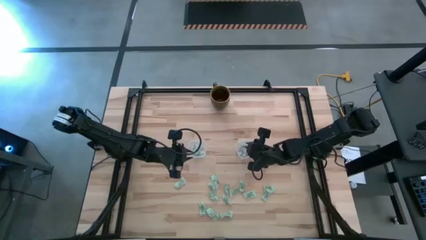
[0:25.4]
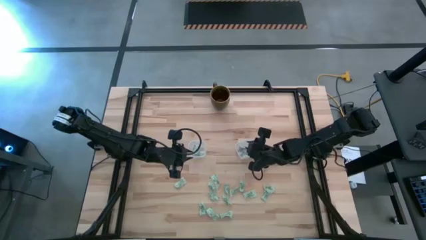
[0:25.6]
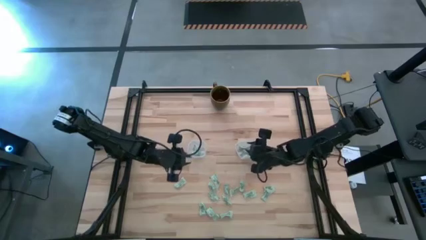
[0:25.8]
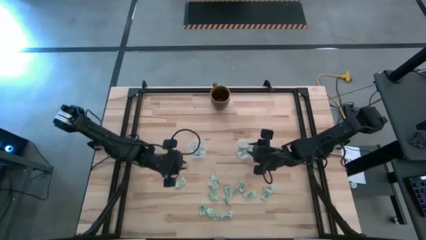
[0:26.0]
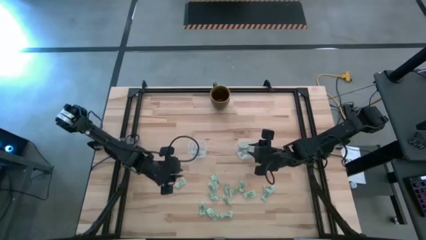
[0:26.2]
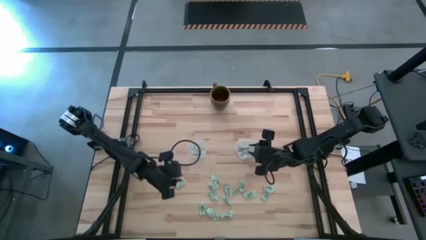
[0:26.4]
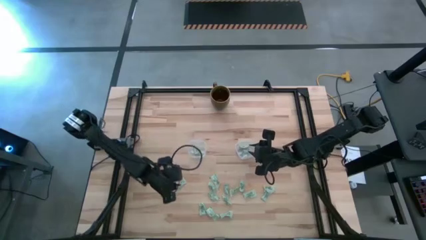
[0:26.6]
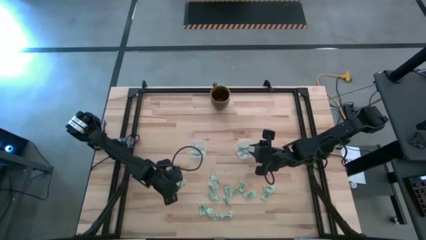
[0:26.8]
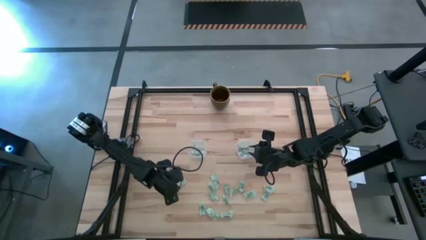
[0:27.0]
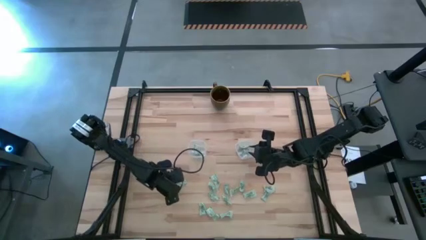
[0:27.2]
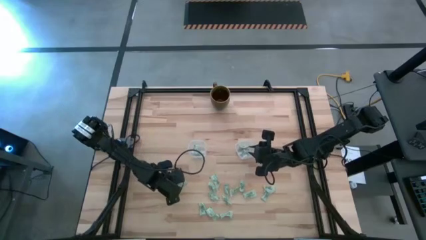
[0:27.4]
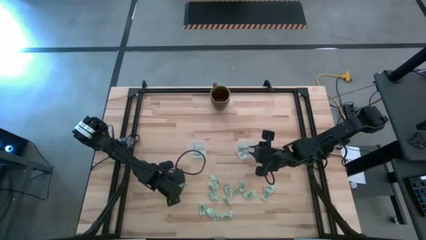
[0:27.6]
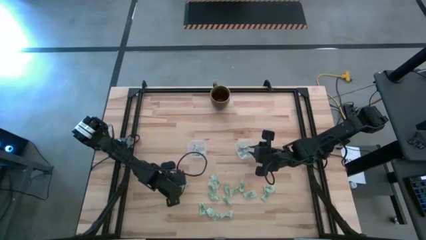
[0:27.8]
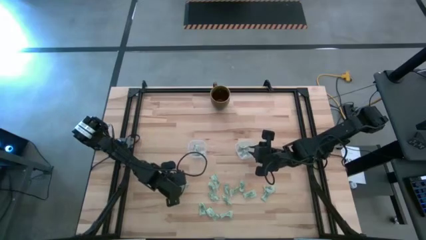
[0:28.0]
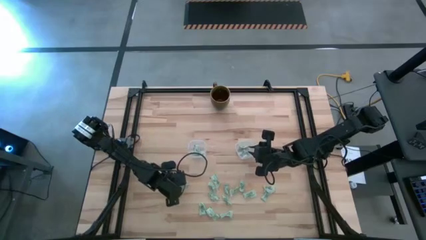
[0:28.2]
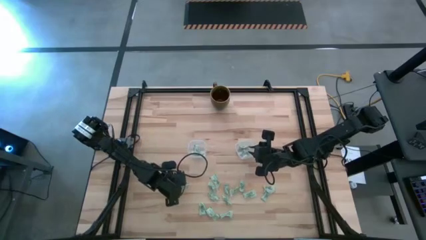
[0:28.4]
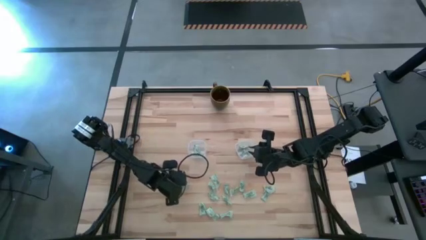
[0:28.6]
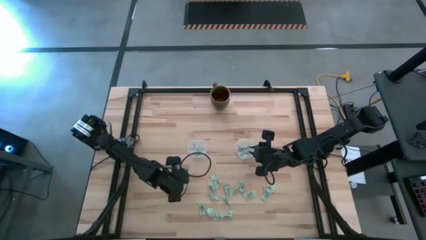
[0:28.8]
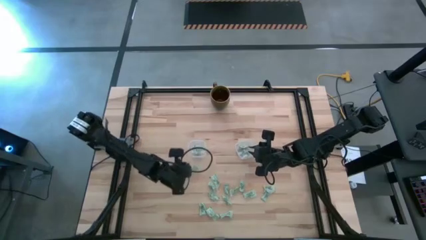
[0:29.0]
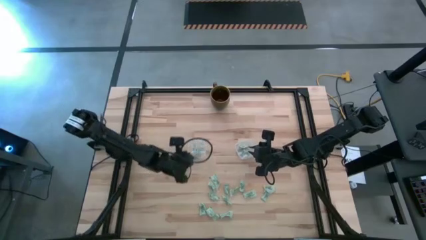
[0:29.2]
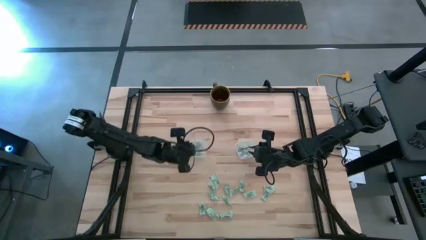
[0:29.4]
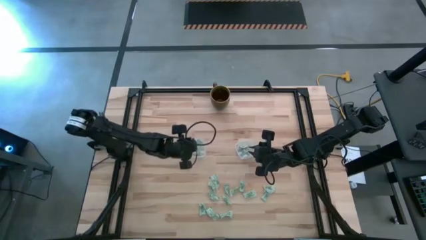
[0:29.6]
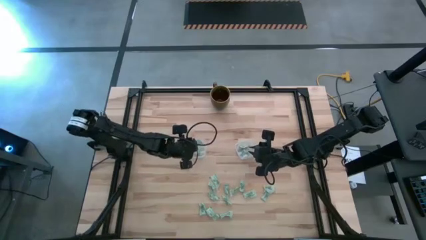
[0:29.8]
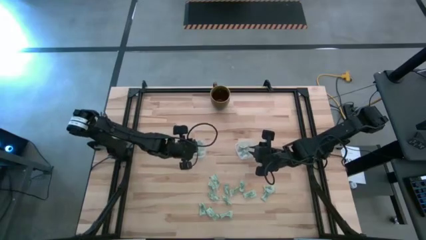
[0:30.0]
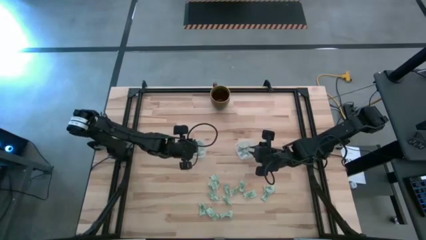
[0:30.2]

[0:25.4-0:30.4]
Task: Pick and place Stevia / Truvia into bins
Put the white stevia packet into the left transparent container

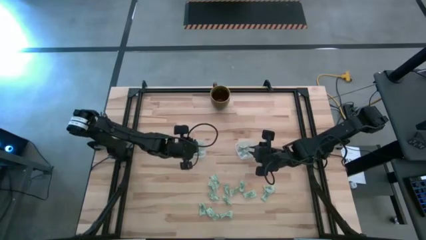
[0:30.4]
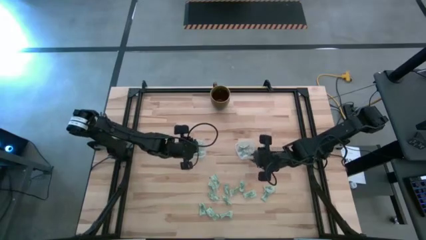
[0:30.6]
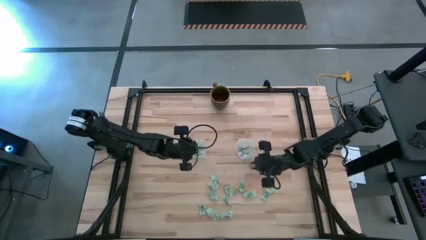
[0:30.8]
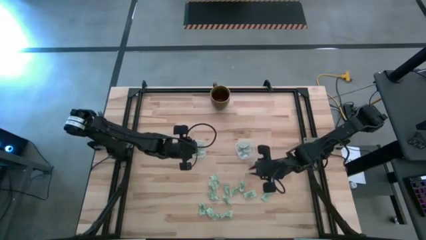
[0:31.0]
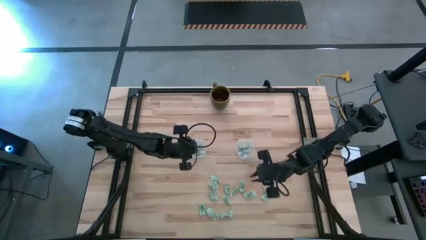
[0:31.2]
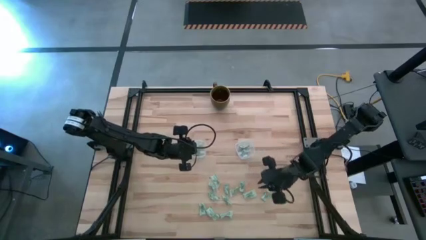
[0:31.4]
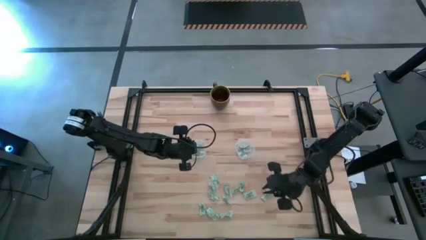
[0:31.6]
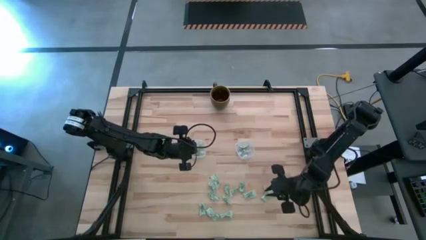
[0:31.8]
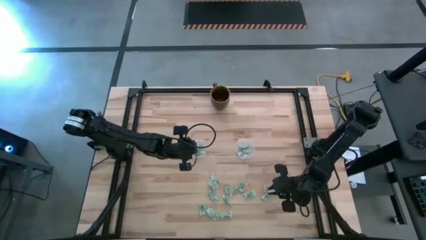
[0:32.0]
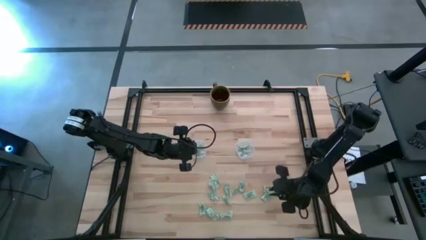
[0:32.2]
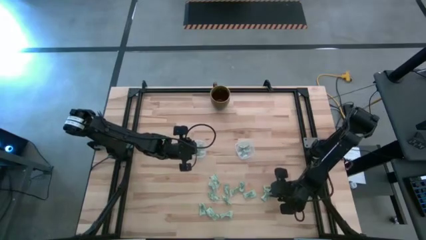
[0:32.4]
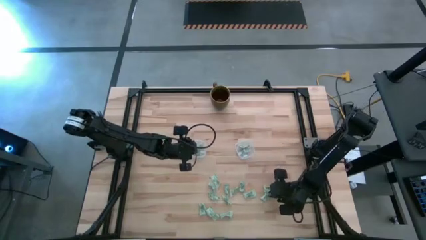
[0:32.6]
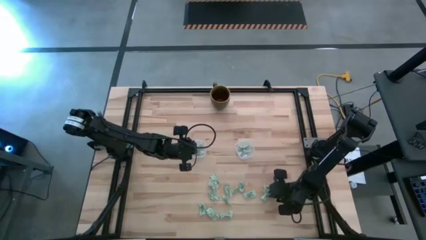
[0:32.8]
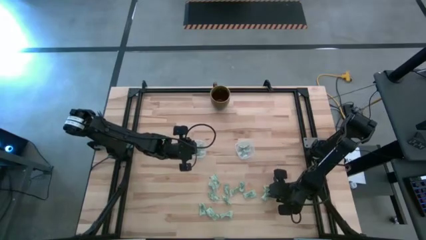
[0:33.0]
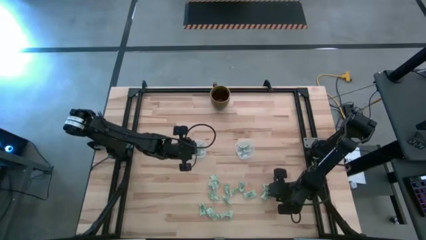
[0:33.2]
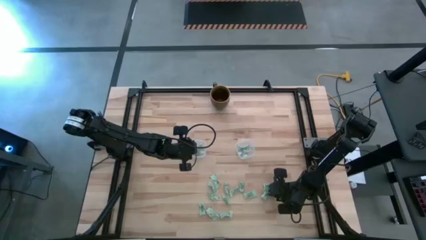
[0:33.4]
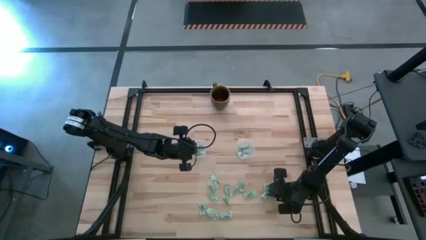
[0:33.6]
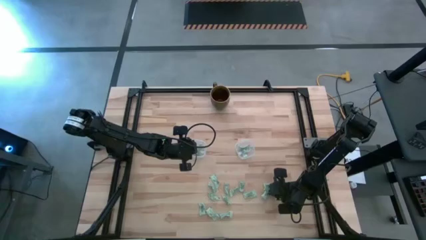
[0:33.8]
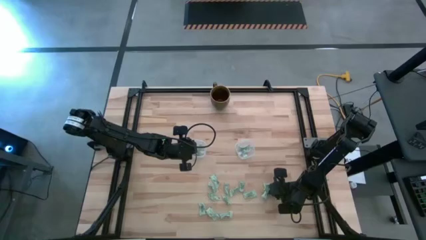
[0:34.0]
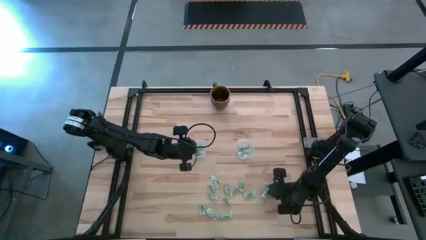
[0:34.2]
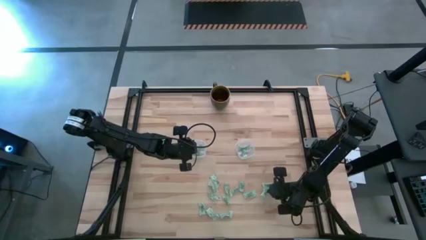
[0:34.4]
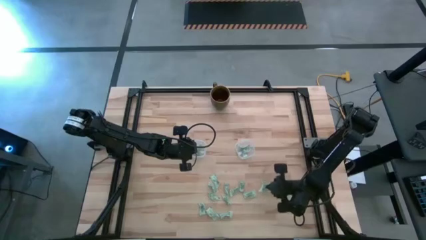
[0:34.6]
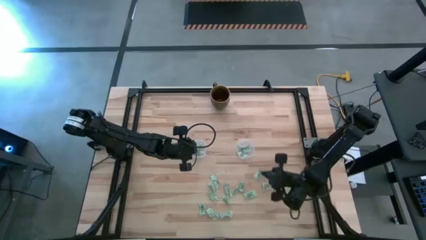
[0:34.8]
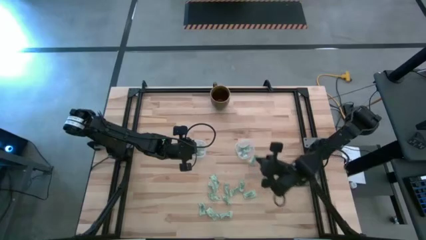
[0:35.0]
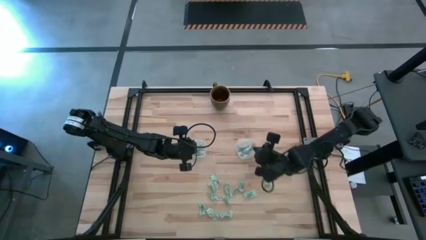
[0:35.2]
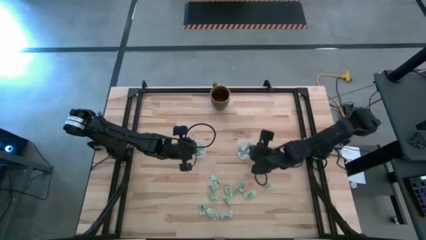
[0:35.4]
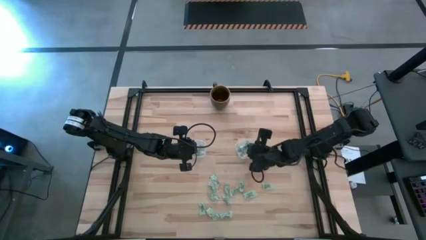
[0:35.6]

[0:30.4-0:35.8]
Put the white stevia packet into the right transparent container

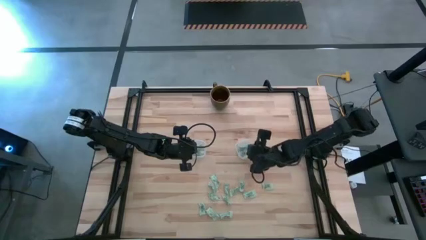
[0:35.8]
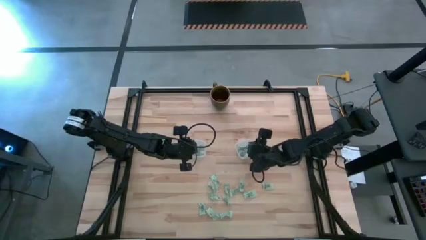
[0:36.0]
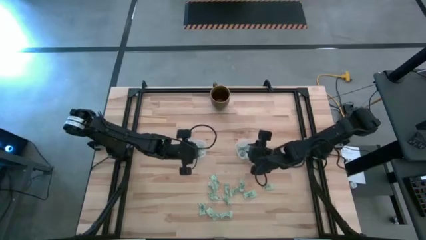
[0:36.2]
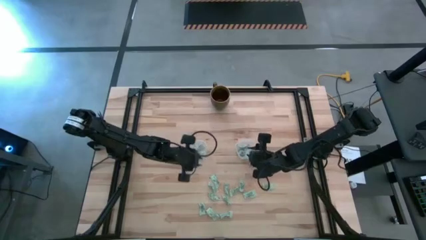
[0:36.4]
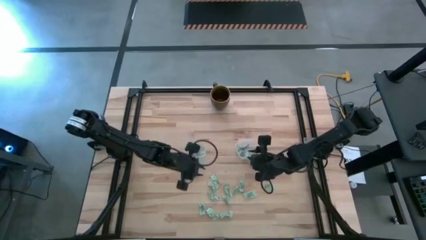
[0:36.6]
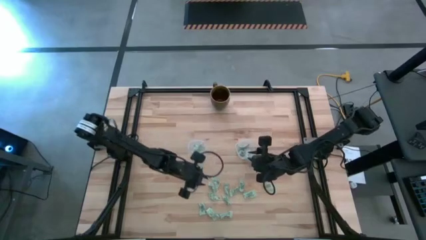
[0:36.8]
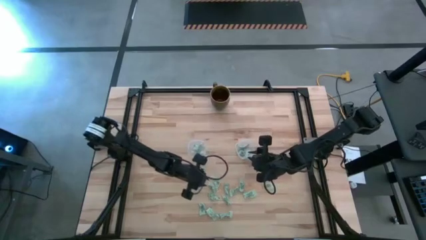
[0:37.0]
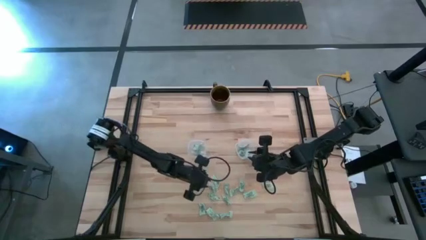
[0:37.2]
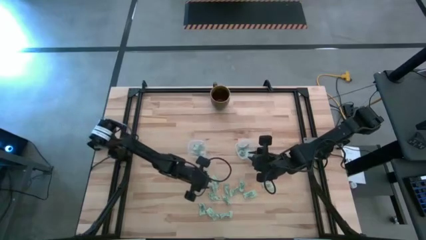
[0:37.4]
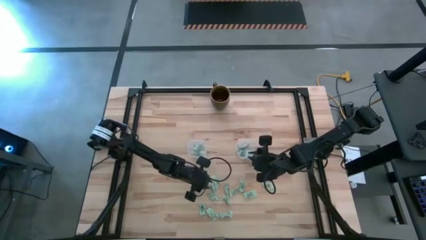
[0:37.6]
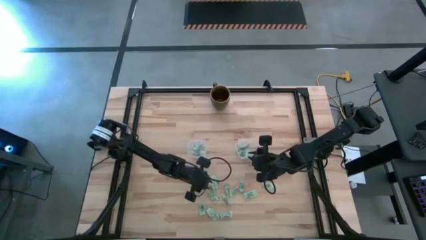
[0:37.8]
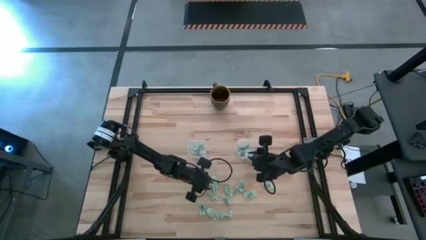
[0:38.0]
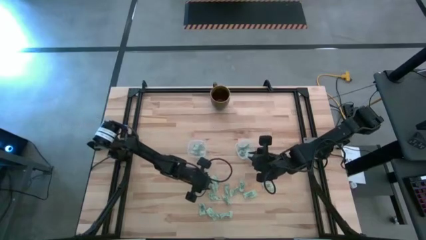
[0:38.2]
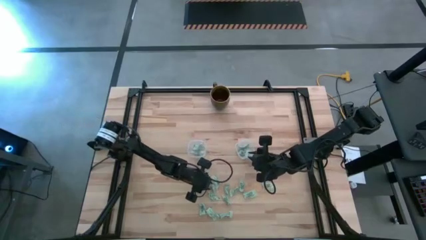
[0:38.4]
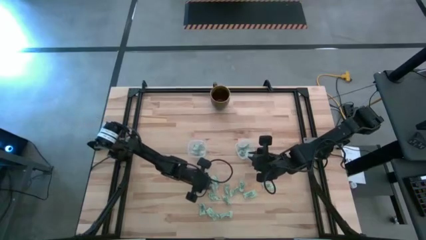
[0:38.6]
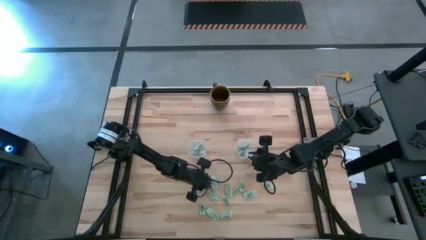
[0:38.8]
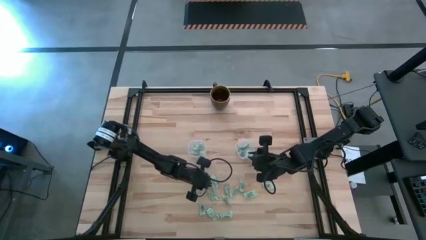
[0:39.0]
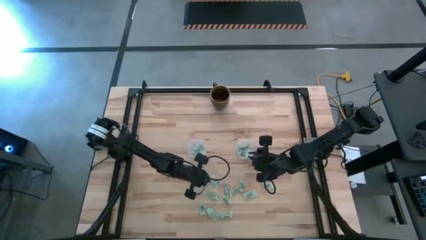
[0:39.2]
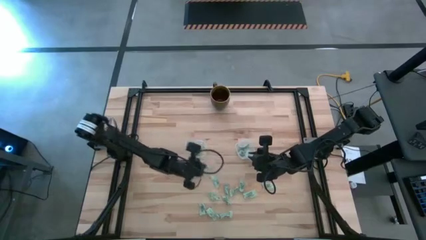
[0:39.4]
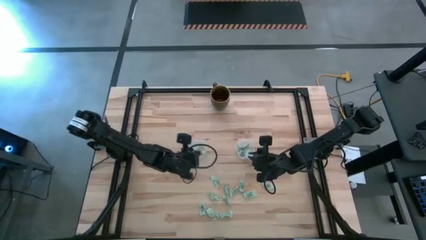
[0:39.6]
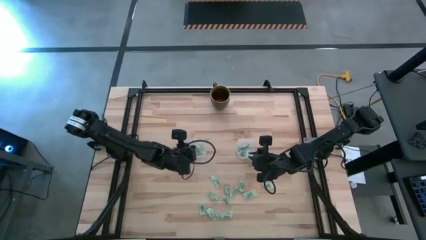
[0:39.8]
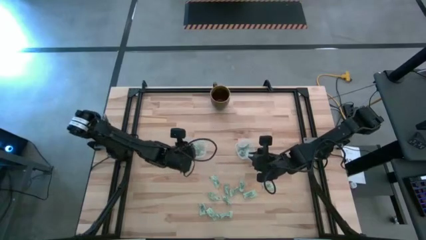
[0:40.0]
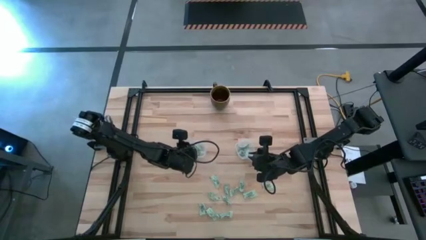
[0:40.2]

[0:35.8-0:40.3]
Put the white stevia packet into the left transparent container

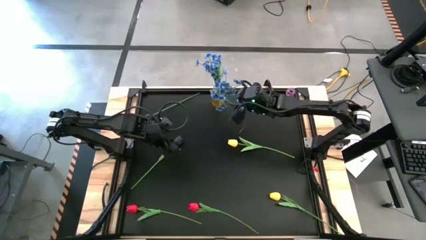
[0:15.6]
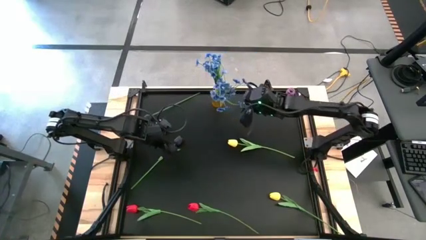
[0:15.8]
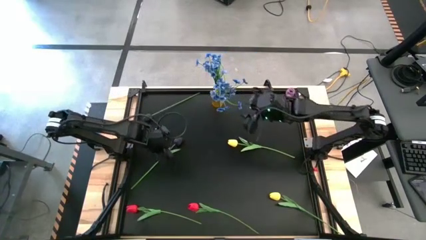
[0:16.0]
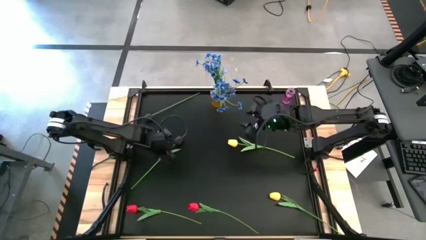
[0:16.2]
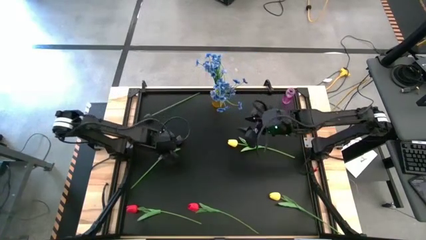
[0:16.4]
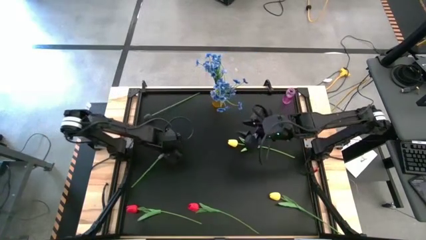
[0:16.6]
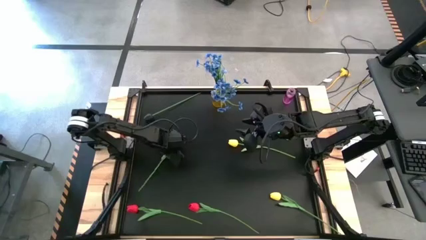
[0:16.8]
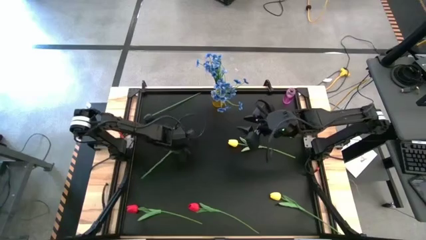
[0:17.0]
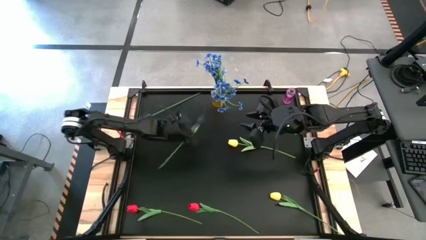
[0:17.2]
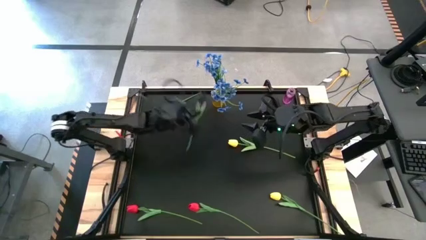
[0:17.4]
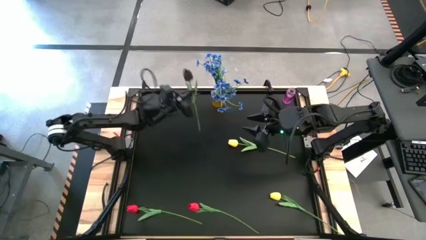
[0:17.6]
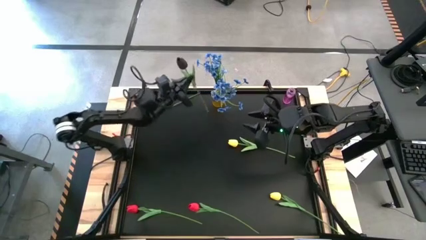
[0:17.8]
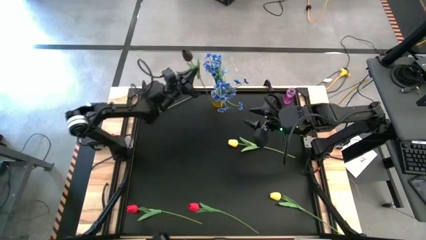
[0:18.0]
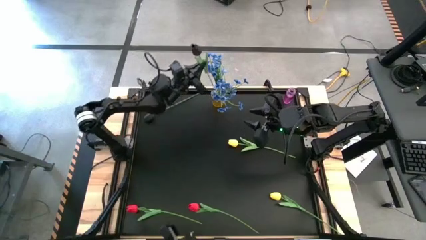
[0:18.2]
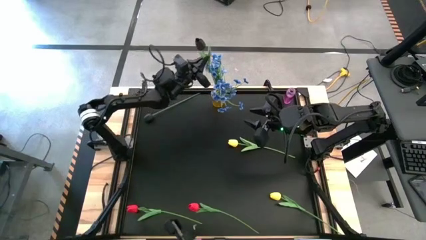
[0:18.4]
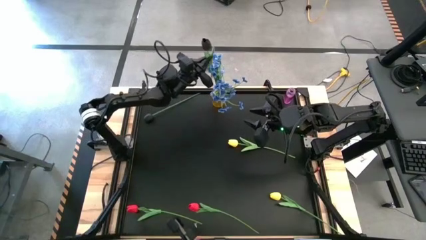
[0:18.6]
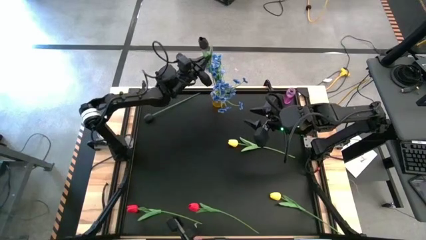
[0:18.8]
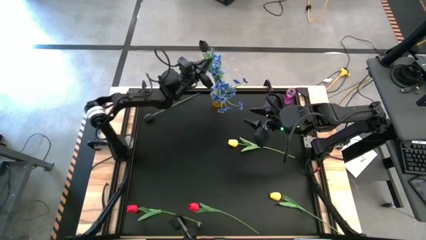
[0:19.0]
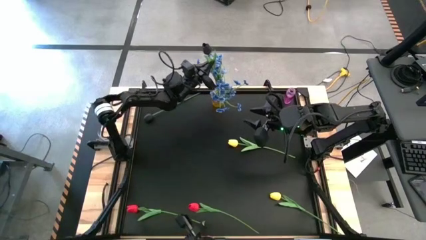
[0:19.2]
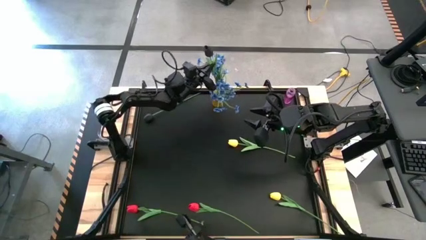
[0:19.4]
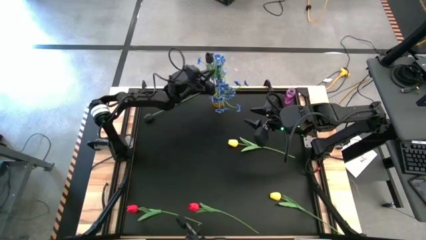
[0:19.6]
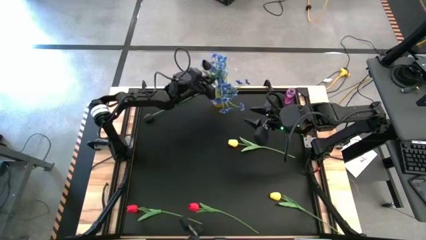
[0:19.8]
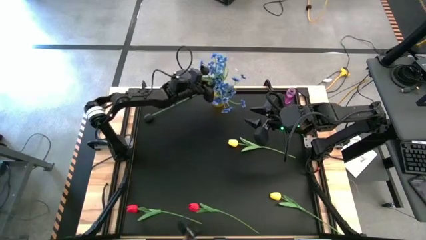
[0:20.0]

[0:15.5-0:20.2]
Task: Sort flowers into vase by color
Put the bottom black flower into the yellow vase
